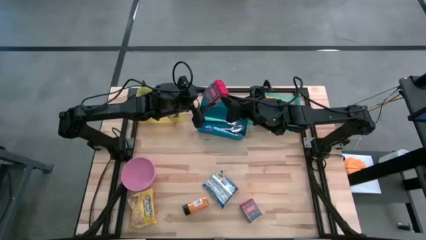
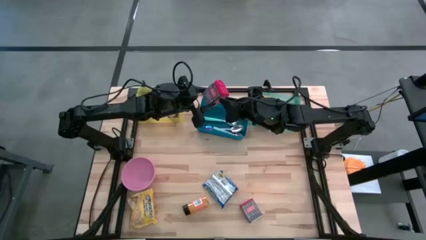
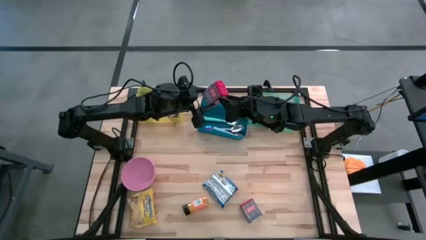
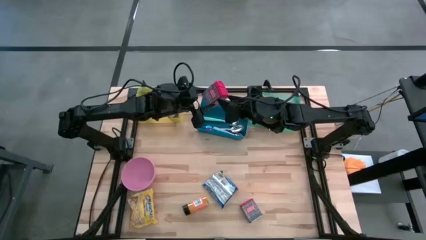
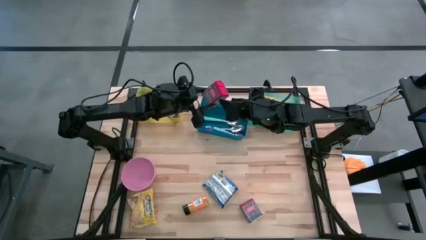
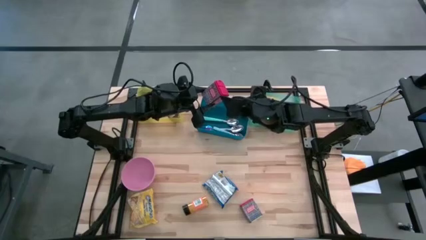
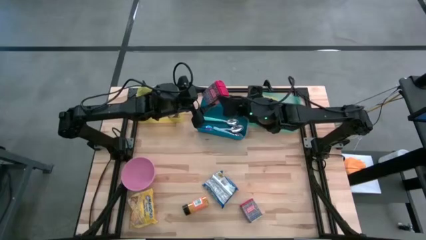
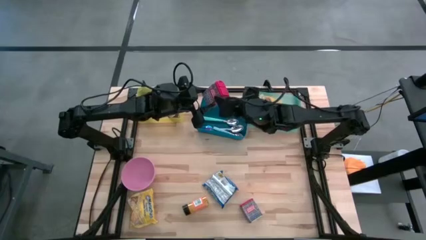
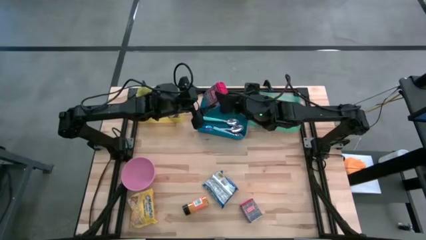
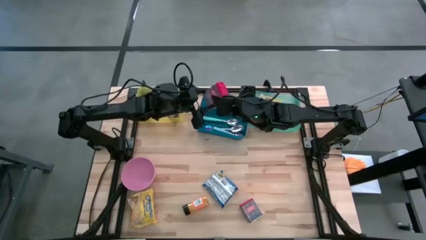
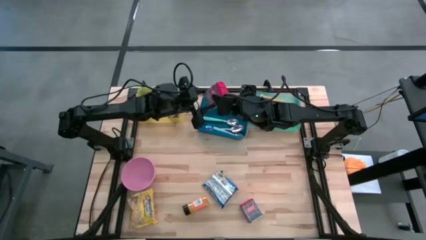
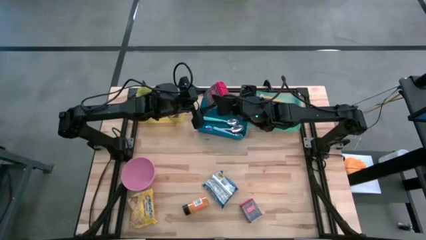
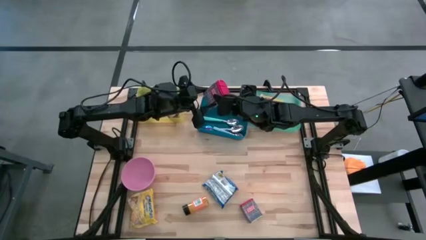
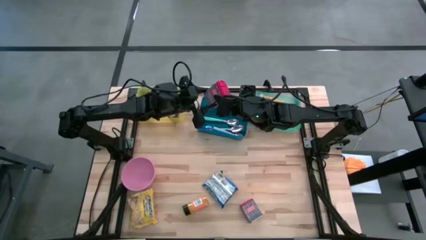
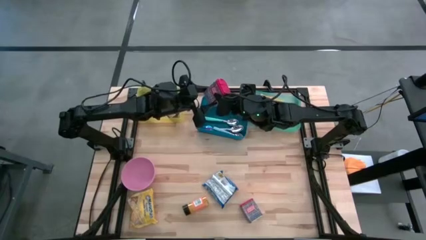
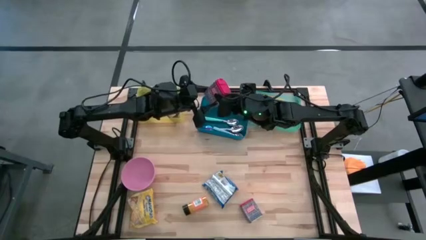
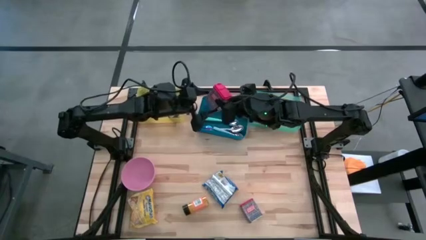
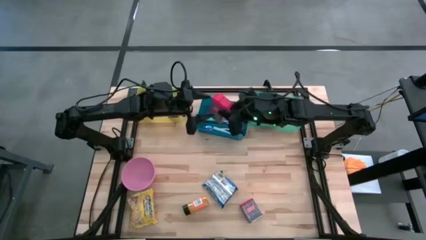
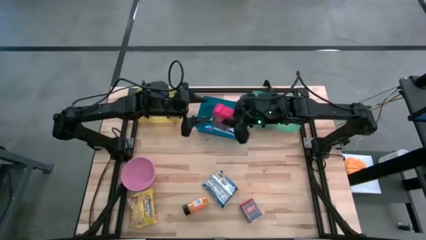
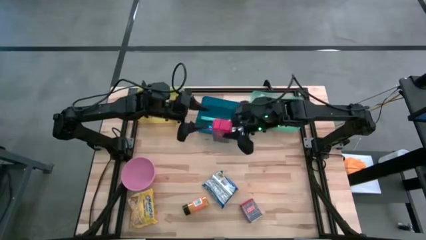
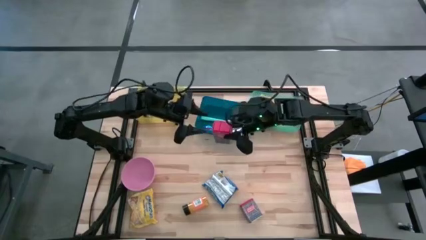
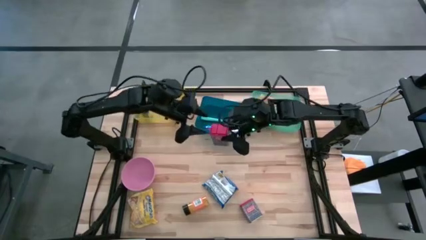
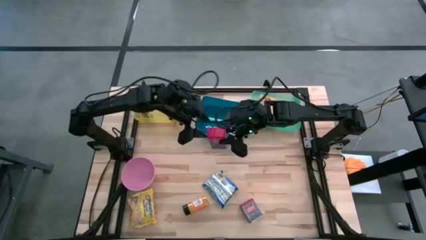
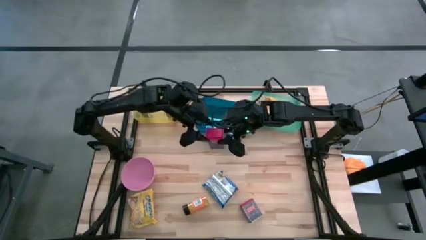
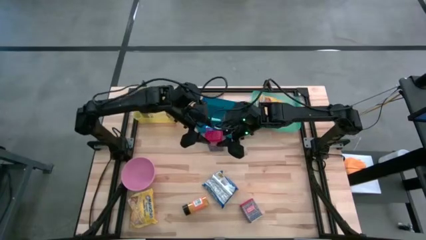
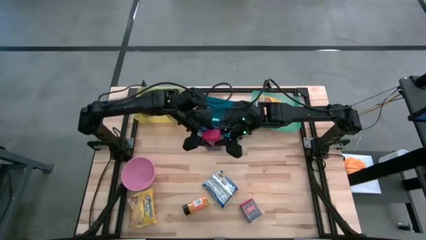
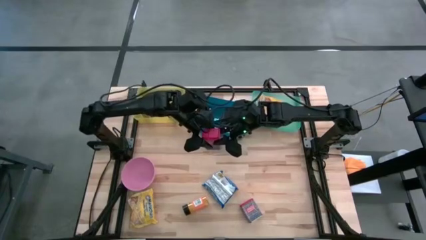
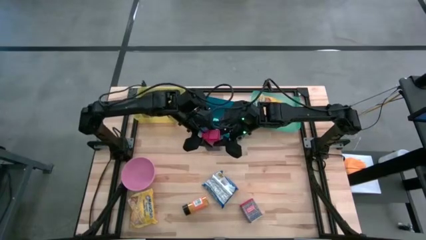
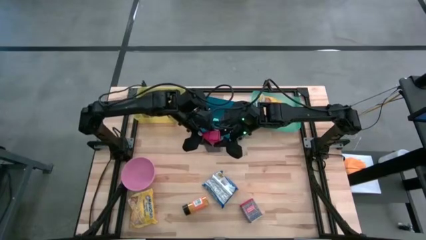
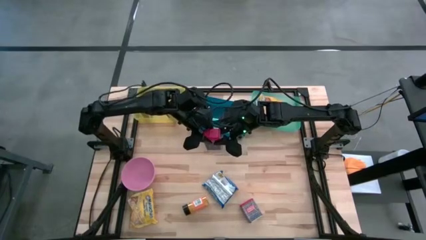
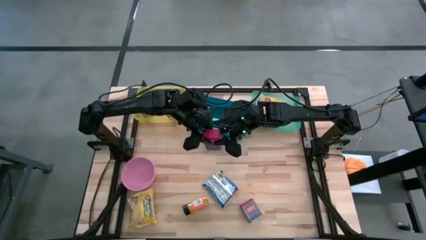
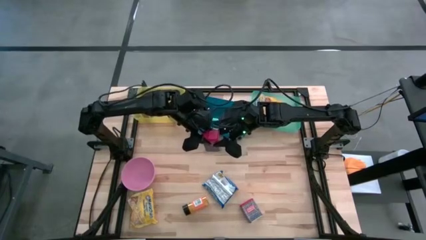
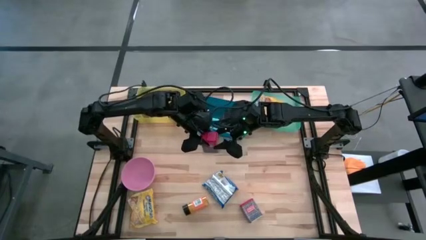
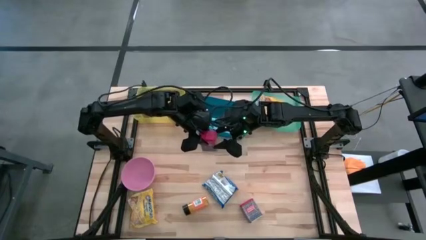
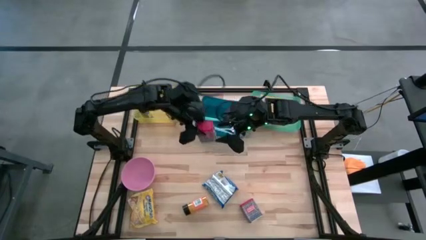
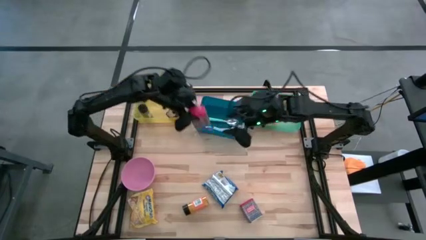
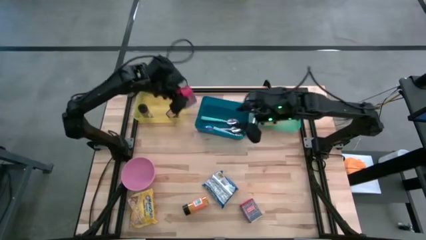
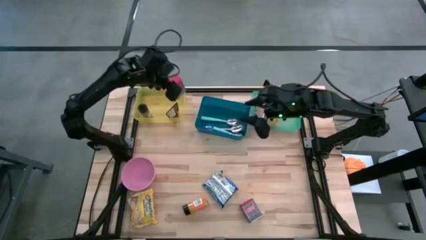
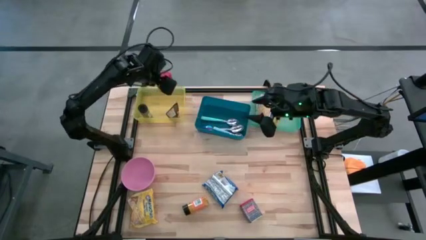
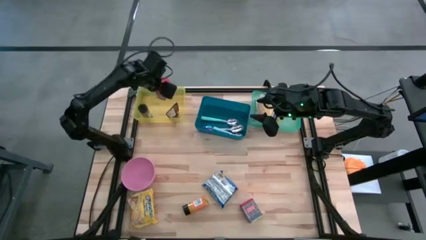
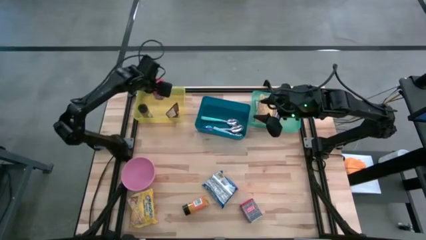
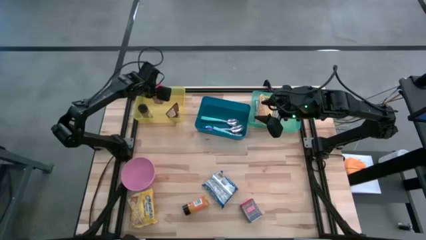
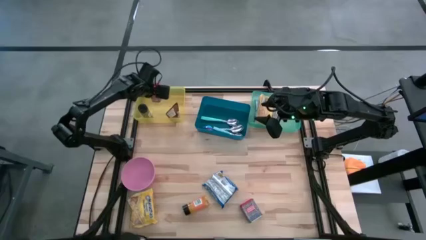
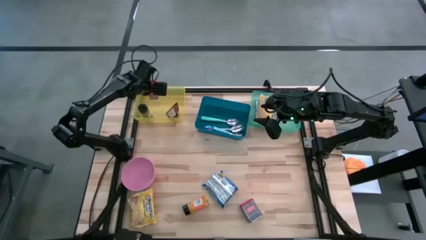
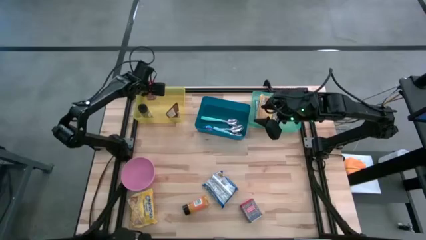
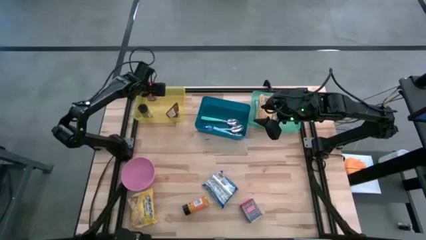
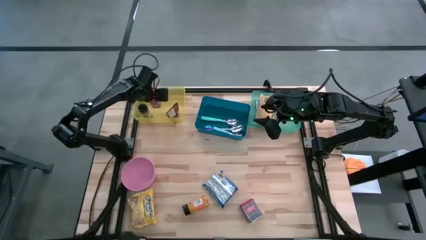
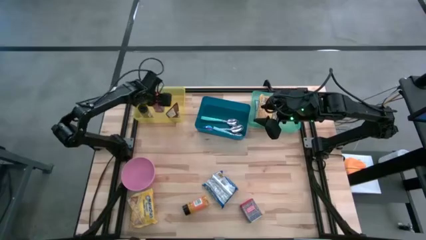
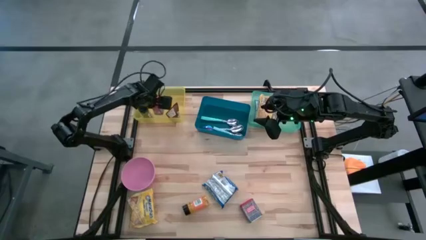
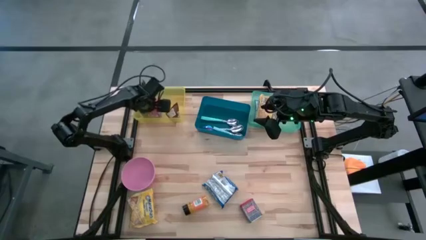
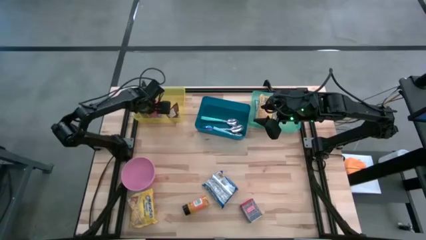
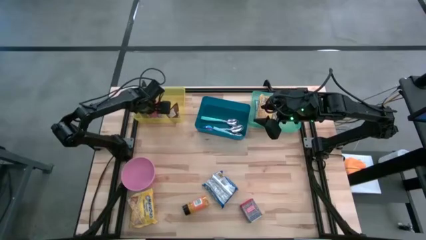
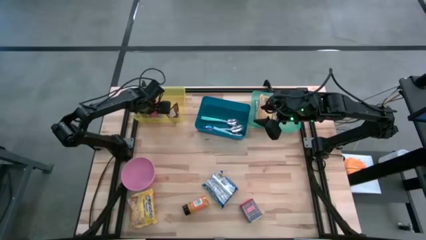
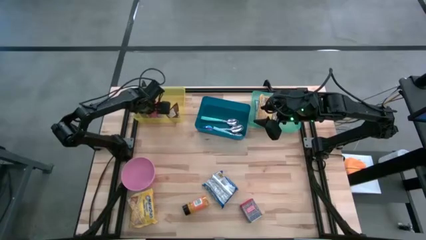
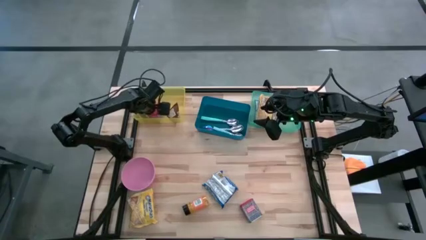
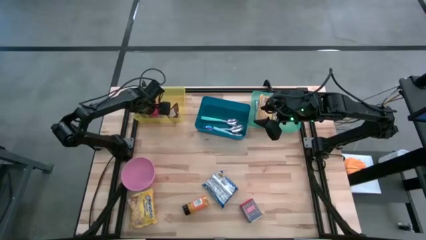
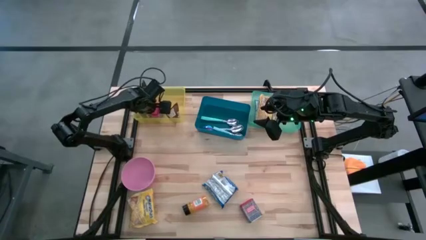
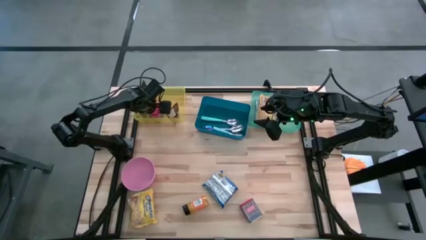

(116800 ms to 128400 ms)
Put the red seasoning can into the yellow bin

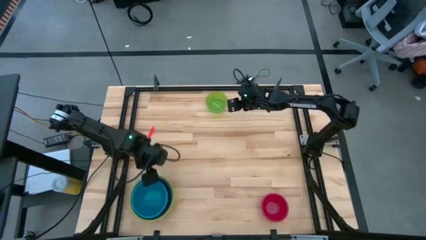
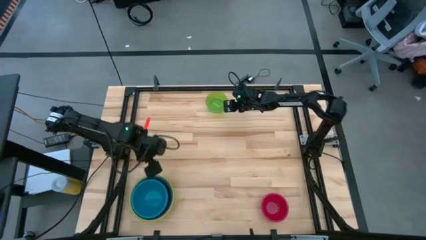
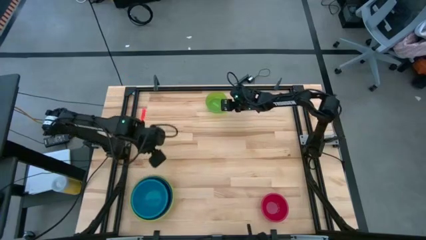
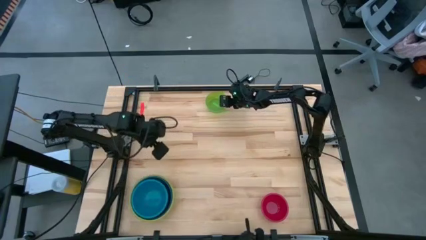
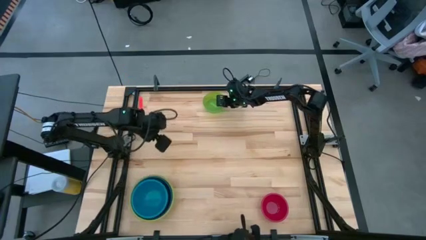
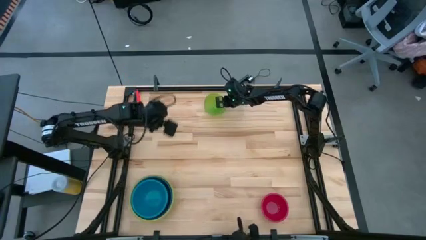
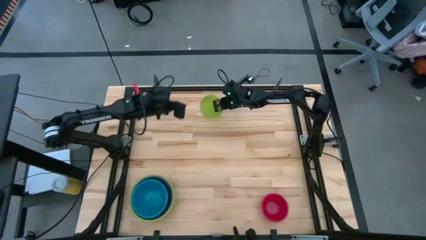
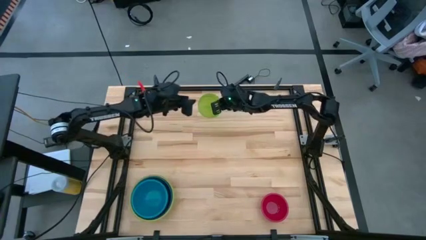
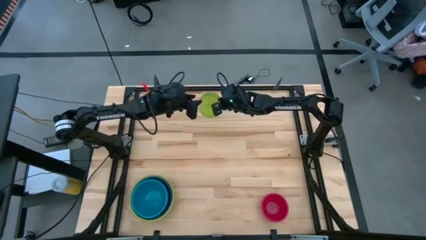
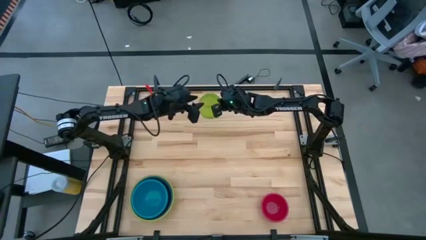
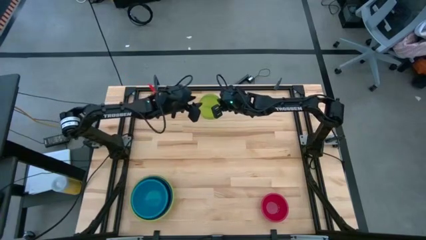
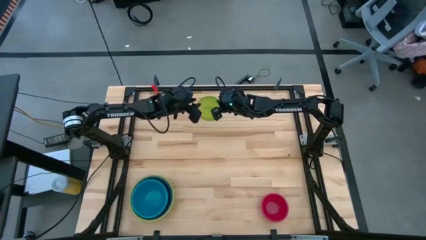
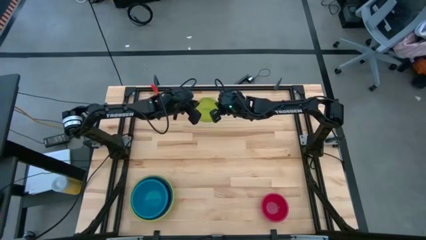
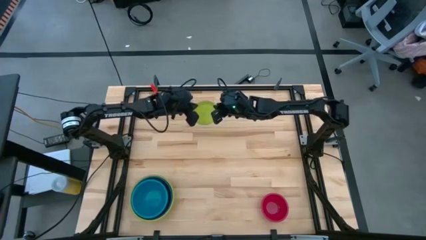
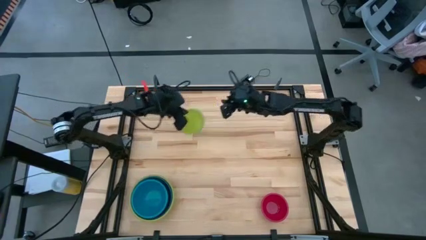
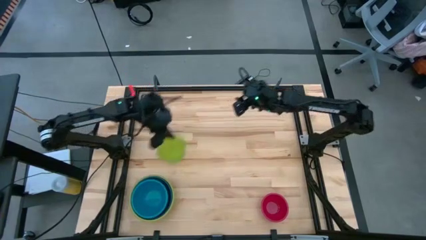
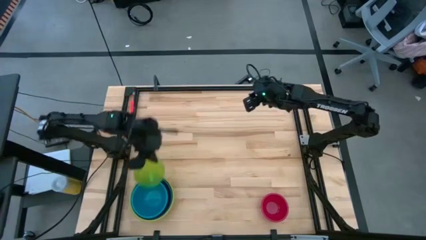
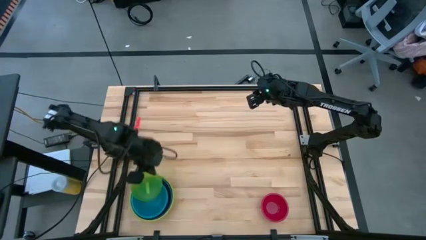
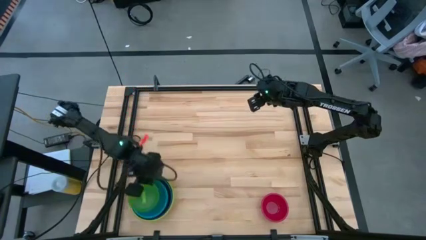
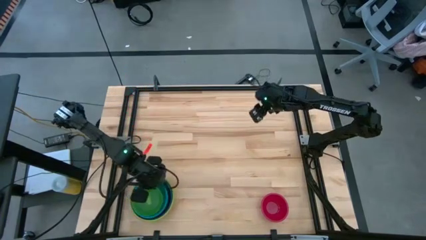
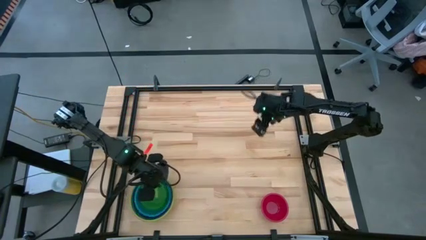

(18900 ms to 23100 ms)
Stack the light green bowl on top of the the blue bowl
